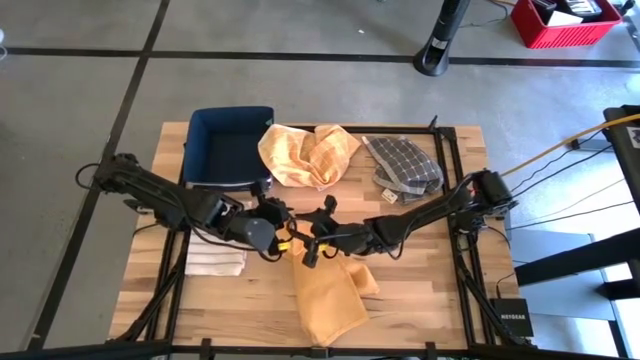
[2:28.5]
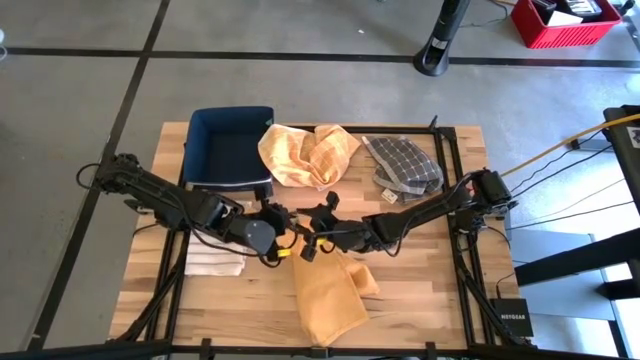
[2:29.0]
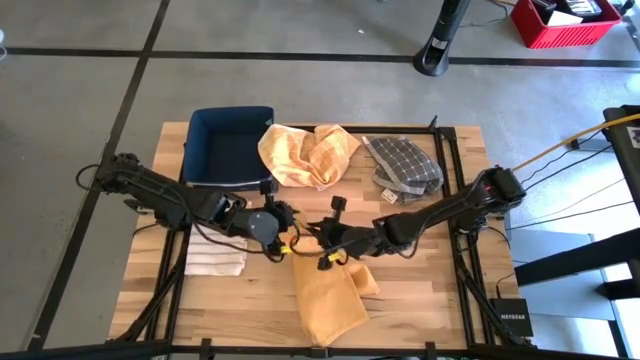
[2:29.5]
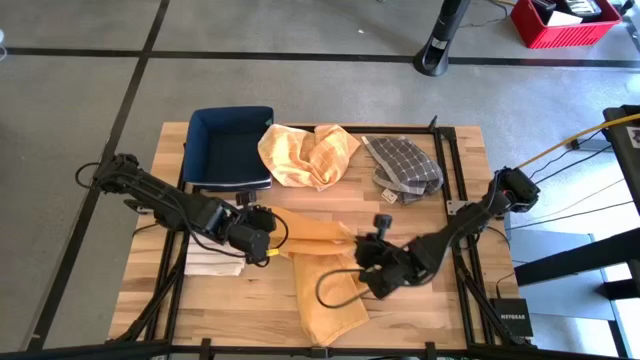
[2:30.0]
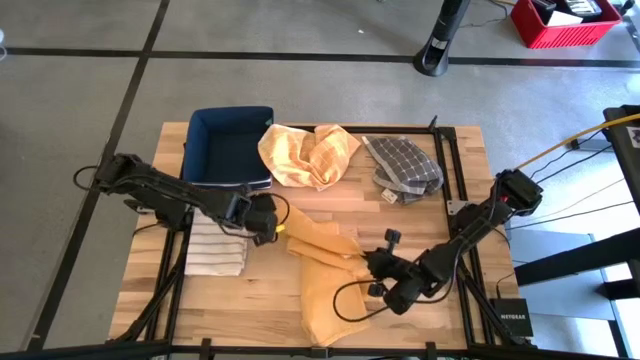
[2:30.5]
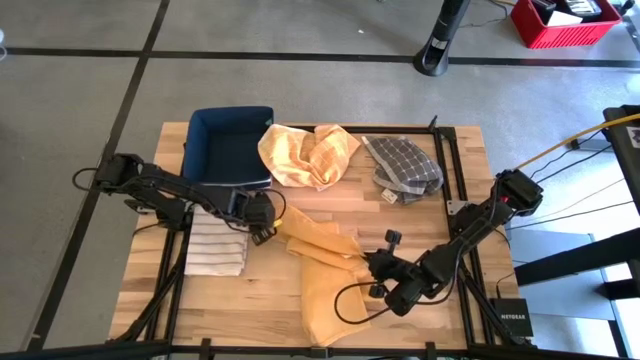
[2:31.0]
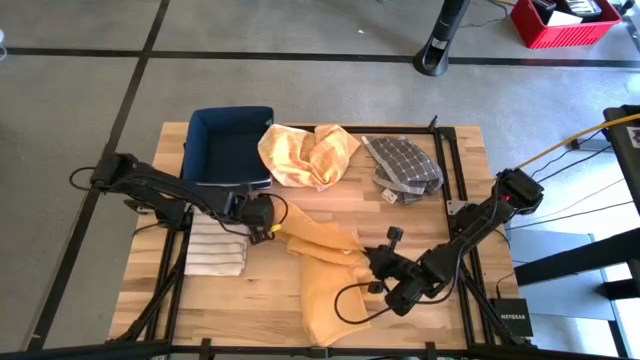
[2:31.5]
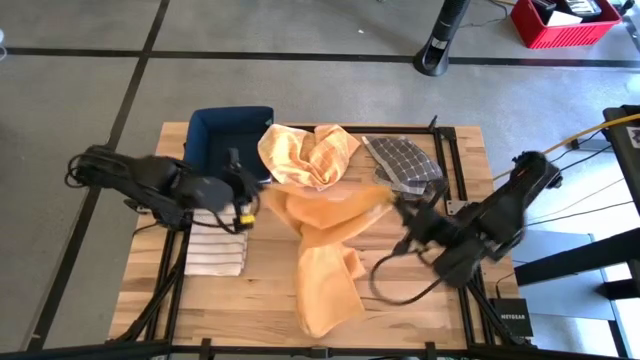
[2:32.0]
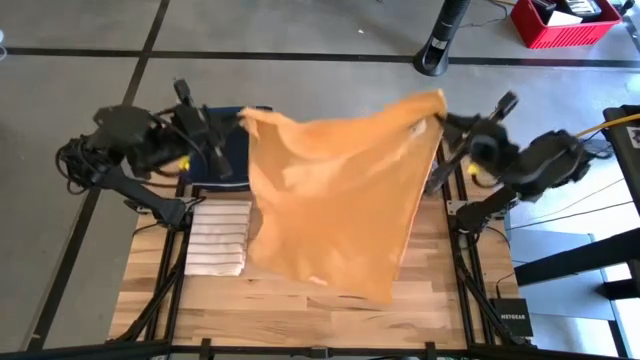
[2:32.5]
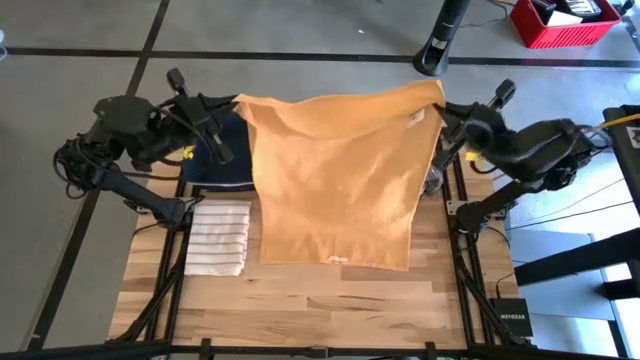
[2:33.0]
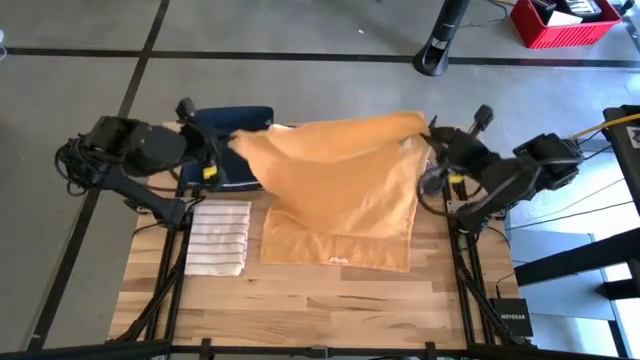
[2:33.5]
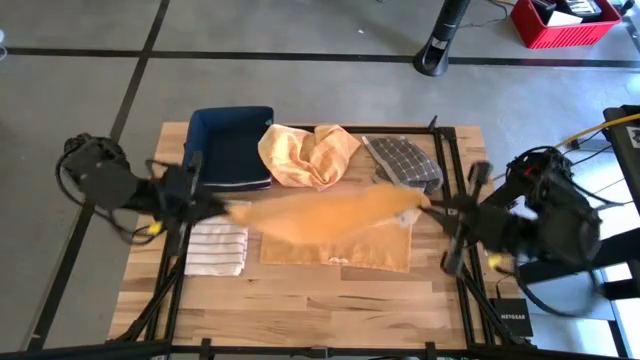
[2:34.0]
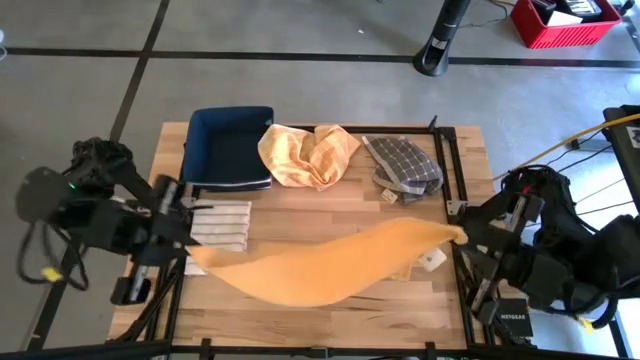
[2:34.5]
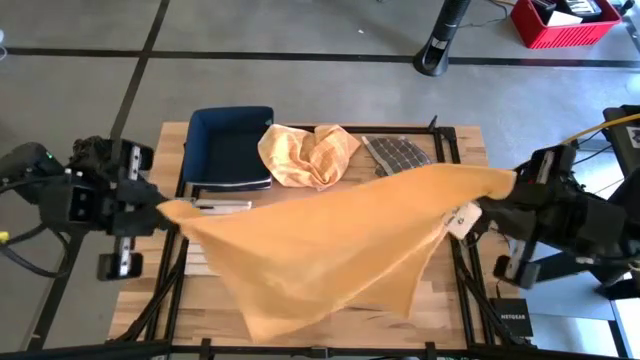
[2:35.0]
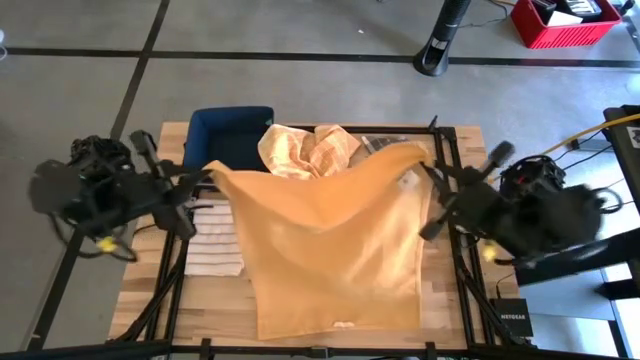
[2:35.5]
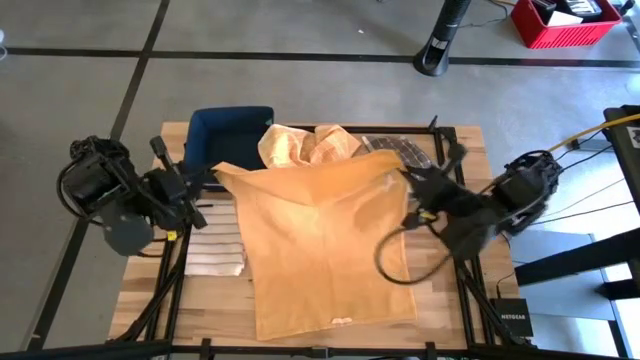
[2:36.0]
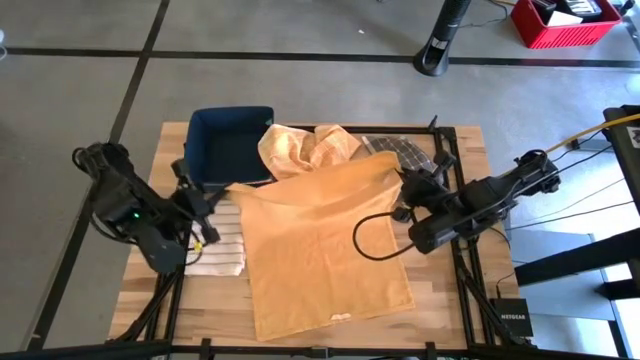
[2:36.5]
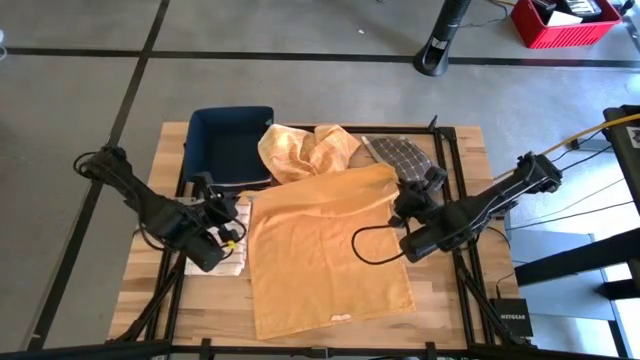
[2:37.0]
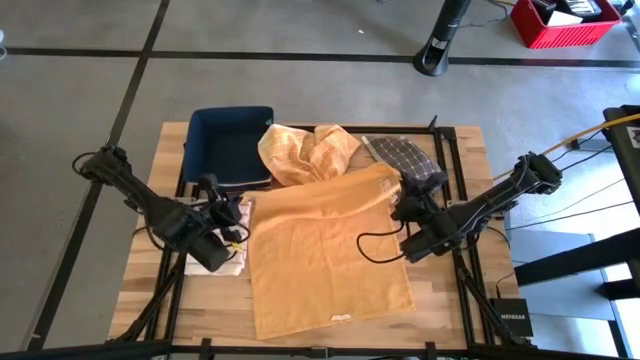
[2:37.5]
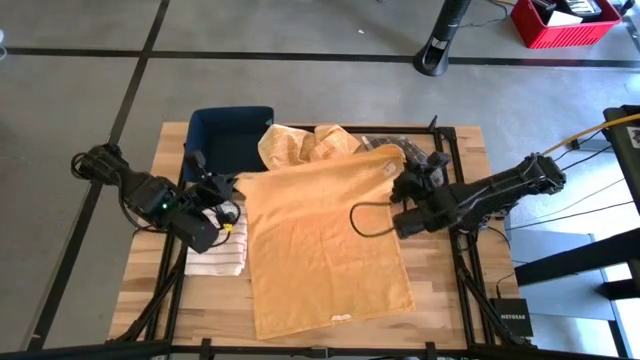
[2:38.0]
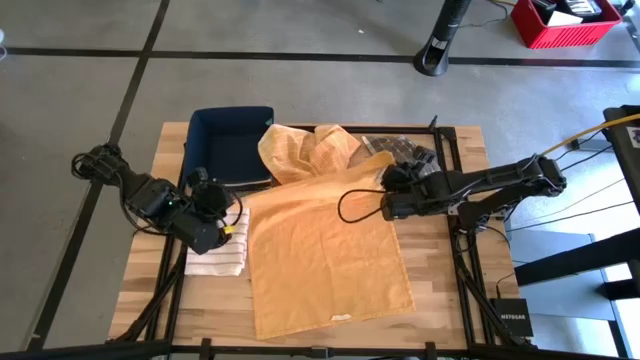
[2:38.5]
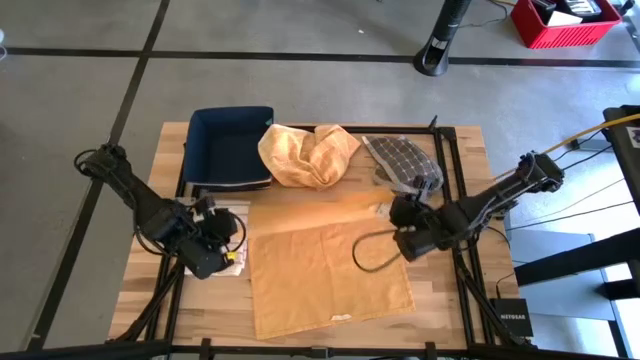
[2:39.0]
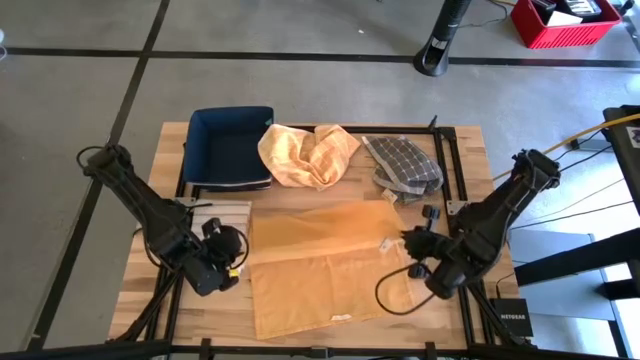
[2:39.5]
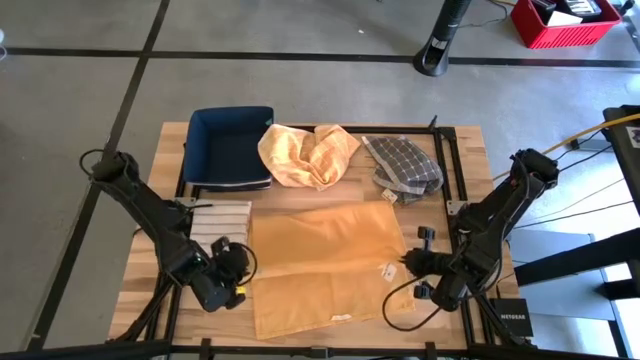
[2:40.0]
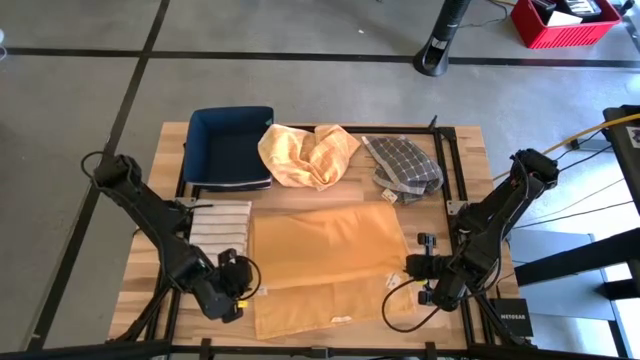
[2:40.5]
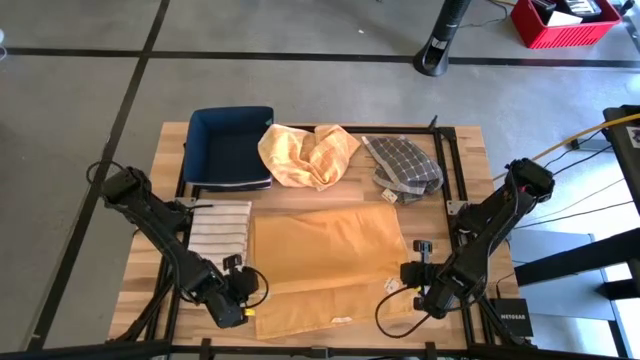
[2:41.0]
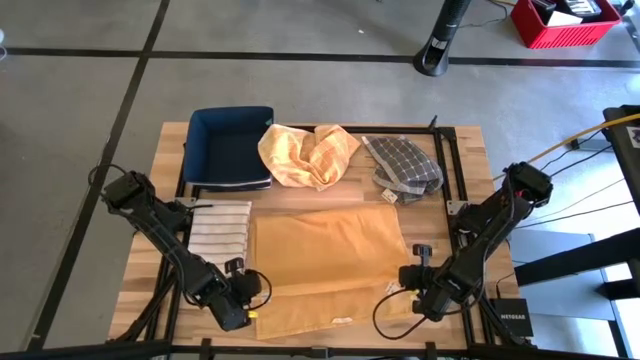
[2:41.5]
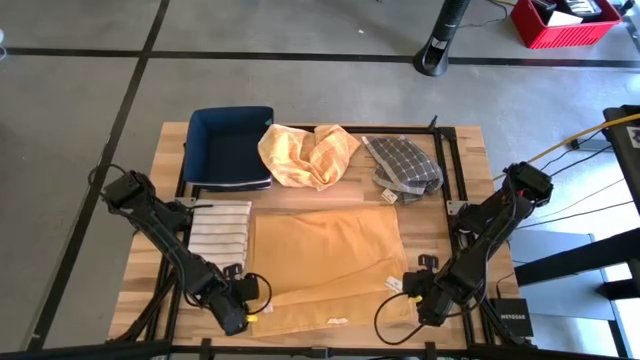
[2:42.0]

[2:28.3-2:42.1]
Task: Fold towel
Fold the orange towel

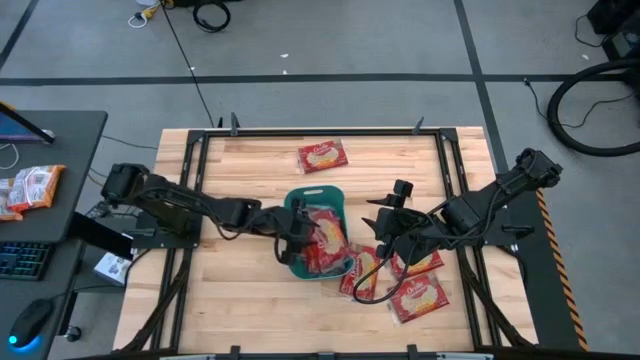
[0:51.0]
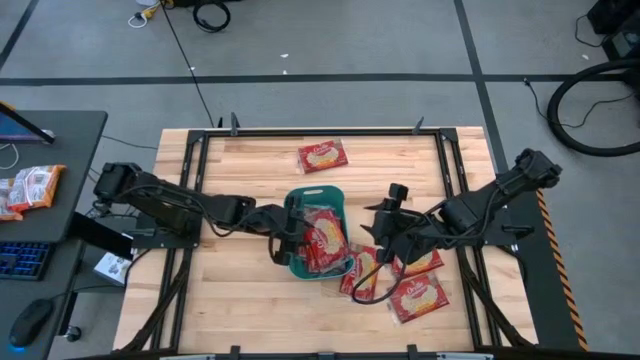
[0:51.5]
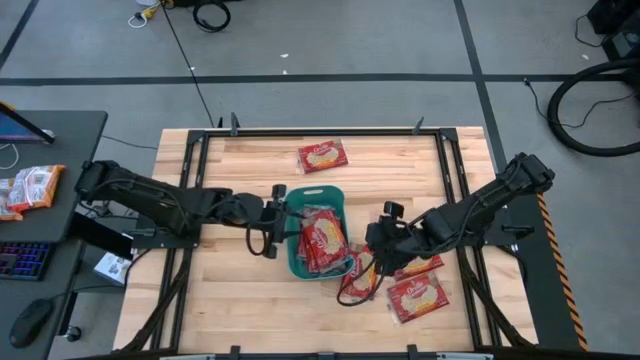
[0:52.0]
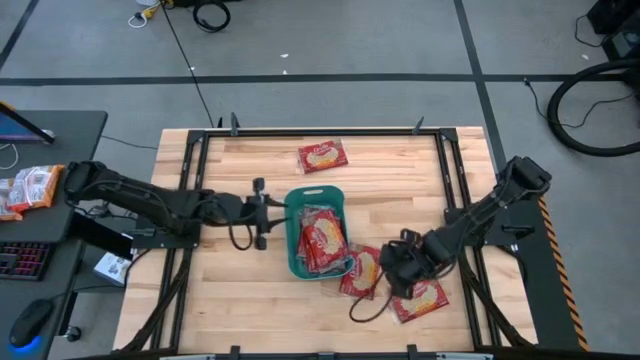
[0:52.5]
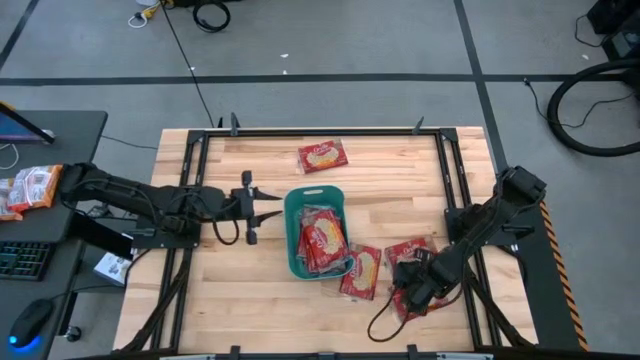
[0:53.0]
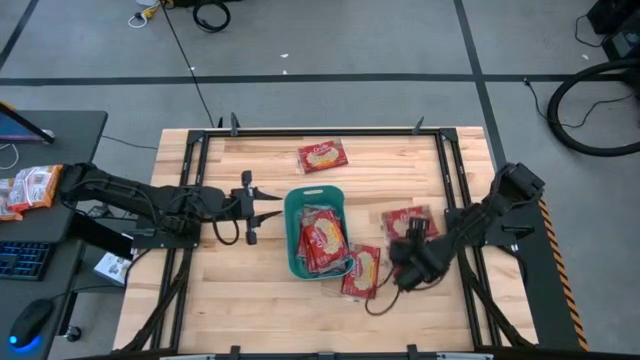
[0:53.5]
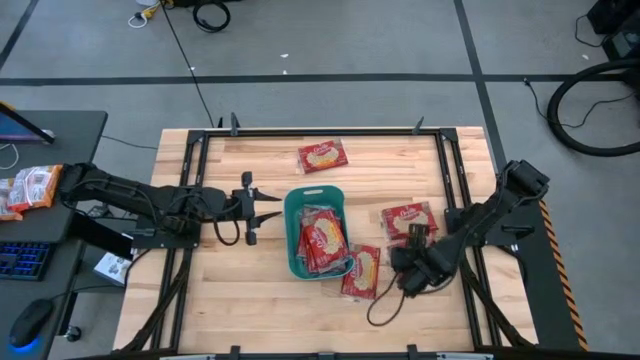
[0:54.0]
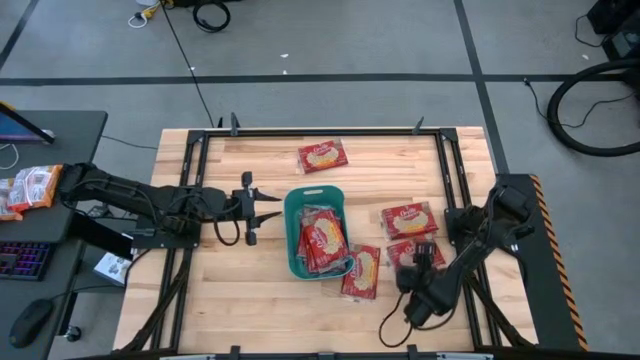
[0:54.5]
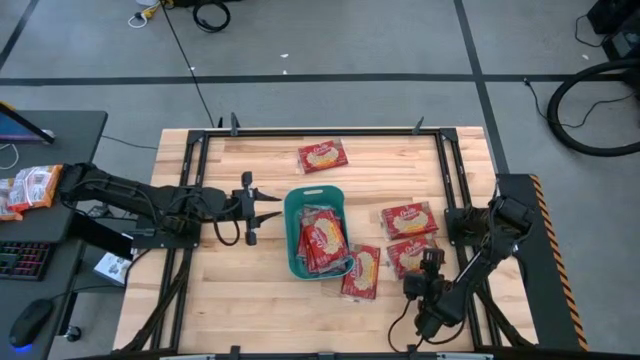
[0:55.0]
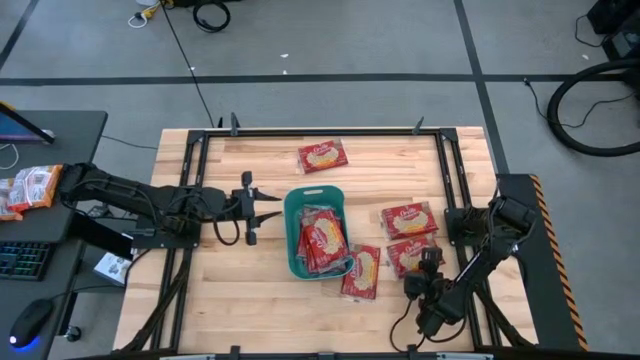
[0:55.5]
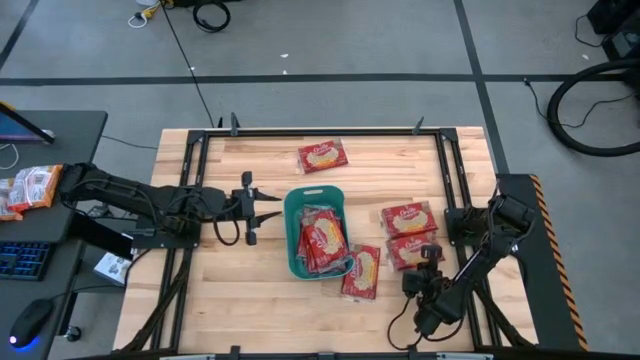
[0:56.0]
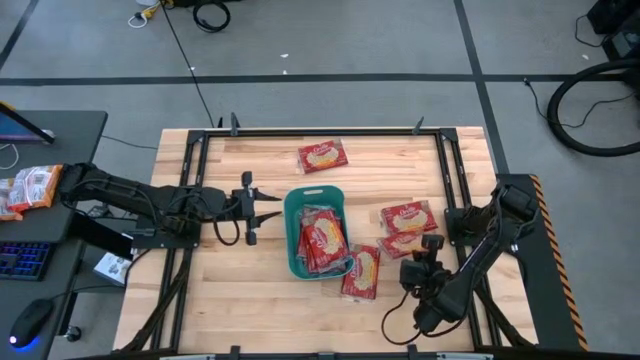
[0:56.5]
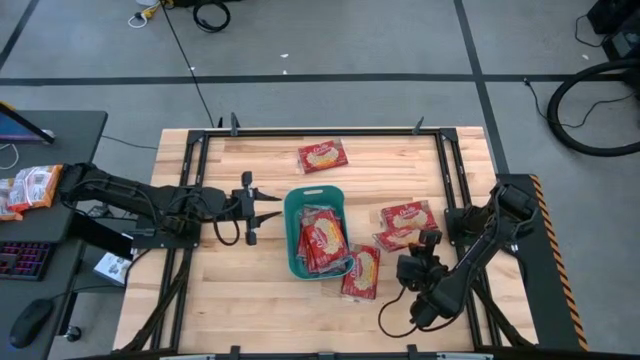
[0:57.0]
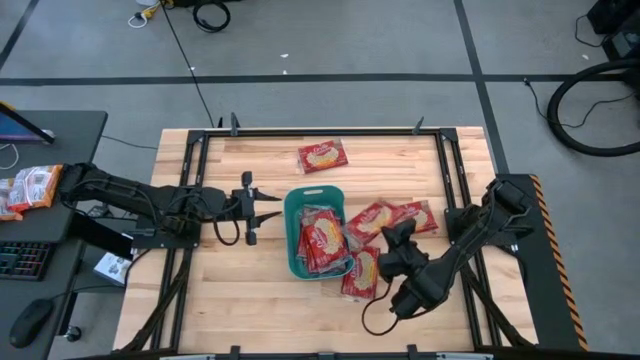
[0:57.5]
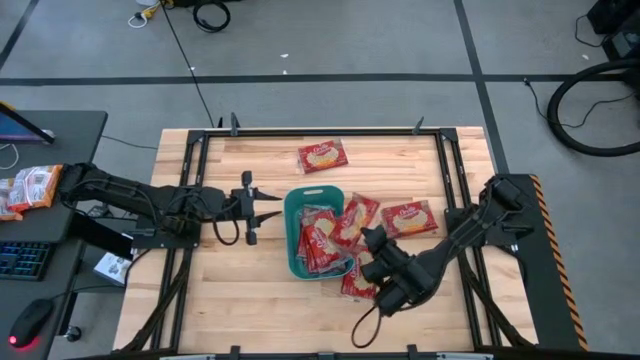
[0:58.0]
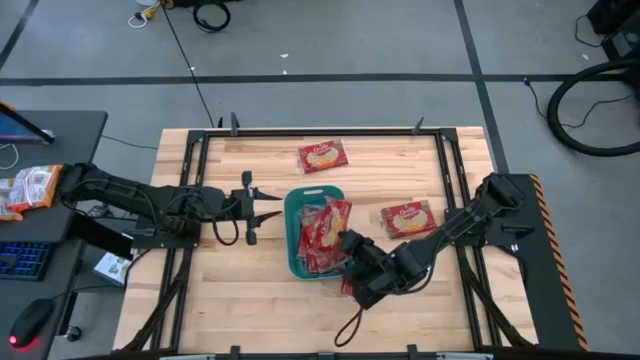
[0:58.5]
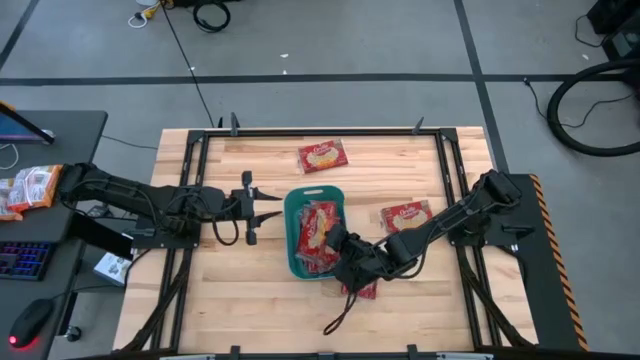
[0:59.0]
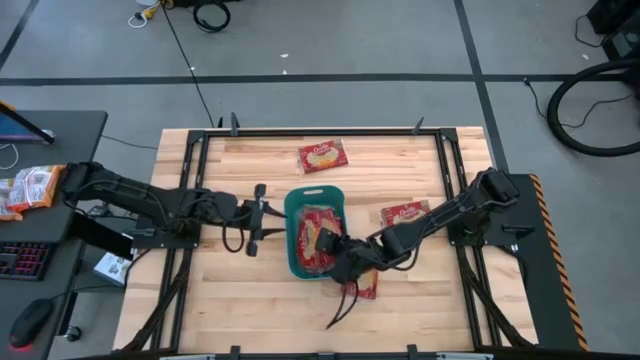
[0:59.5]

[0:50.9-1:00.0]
Task: Sort popcorn bags into baskets
Put the red popcorn bag into the green bin
